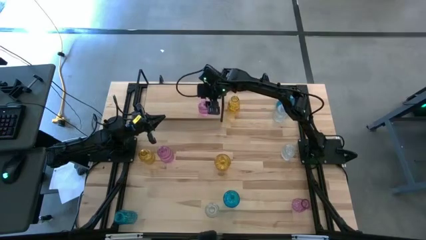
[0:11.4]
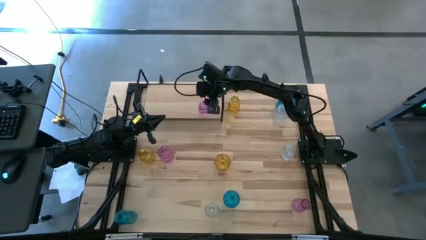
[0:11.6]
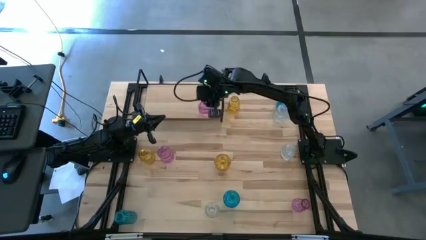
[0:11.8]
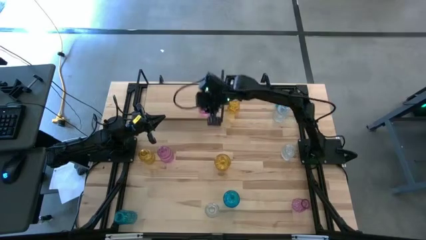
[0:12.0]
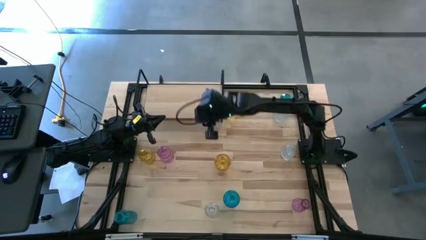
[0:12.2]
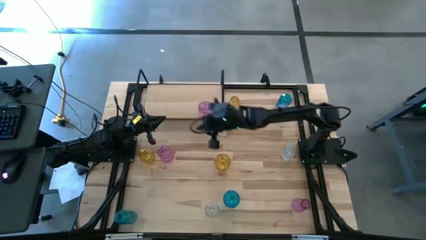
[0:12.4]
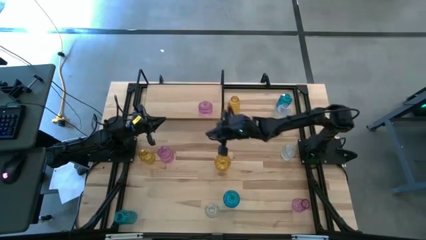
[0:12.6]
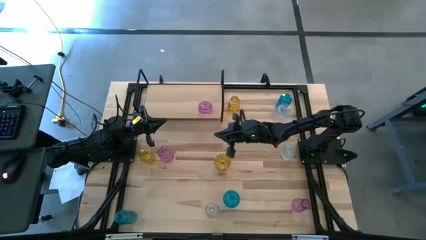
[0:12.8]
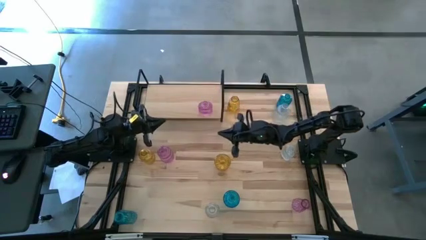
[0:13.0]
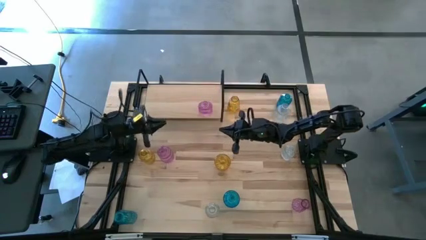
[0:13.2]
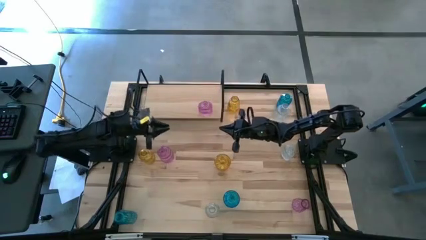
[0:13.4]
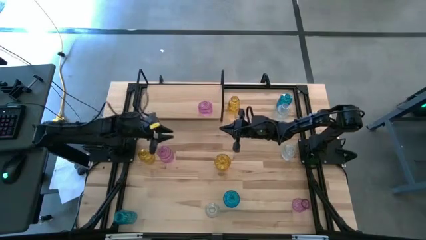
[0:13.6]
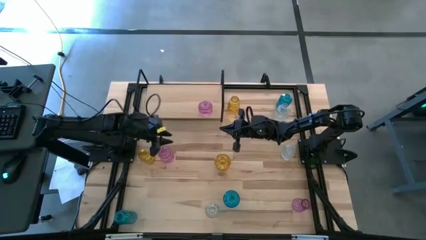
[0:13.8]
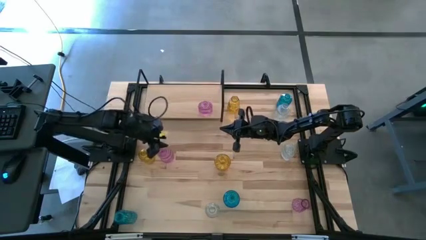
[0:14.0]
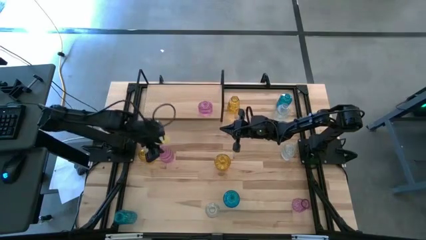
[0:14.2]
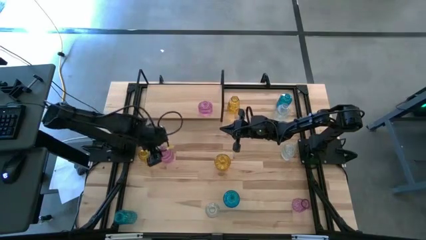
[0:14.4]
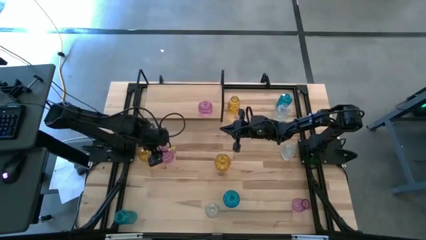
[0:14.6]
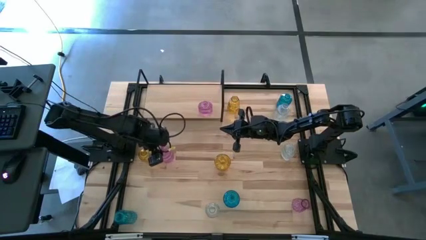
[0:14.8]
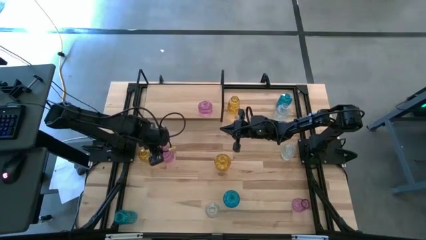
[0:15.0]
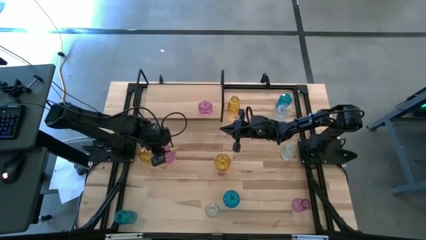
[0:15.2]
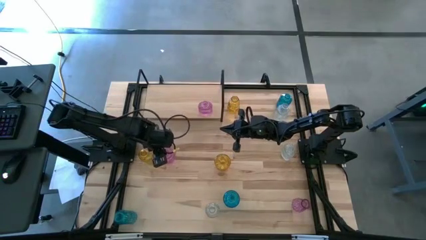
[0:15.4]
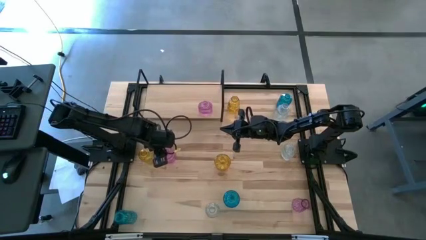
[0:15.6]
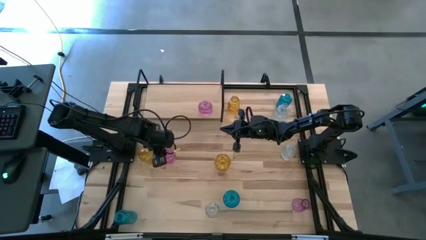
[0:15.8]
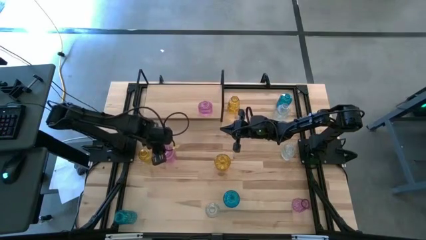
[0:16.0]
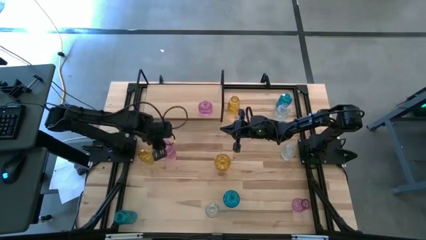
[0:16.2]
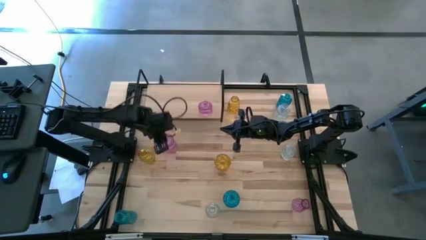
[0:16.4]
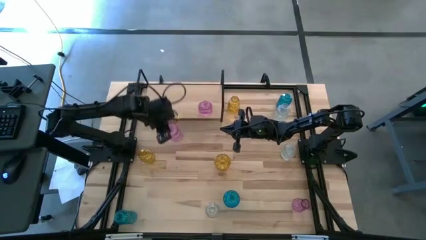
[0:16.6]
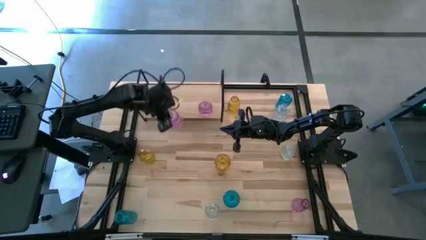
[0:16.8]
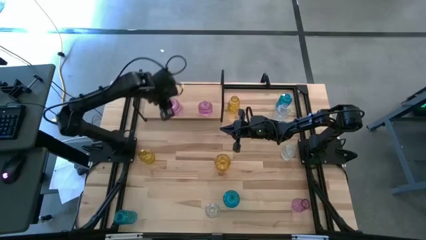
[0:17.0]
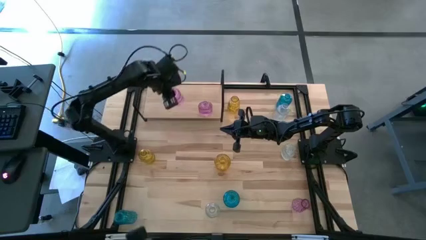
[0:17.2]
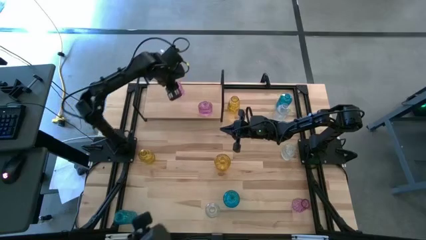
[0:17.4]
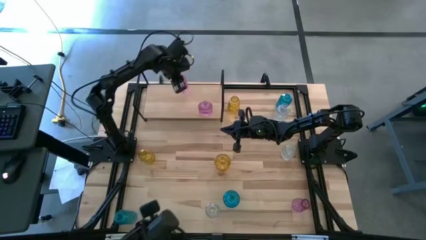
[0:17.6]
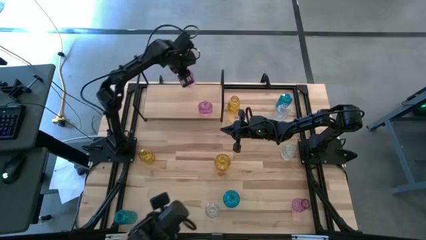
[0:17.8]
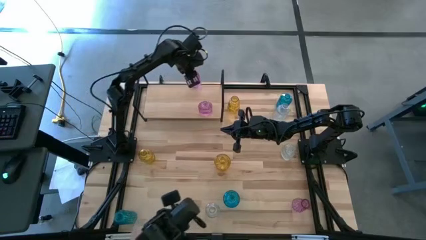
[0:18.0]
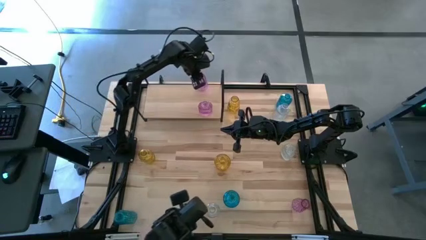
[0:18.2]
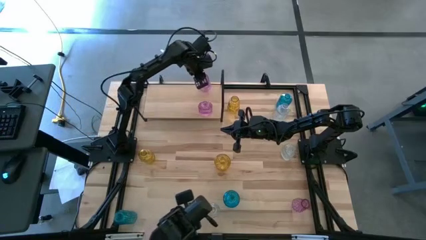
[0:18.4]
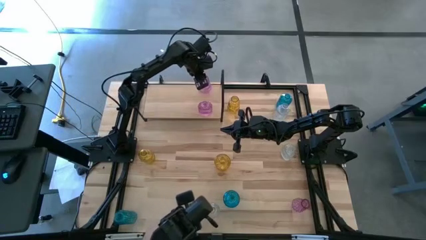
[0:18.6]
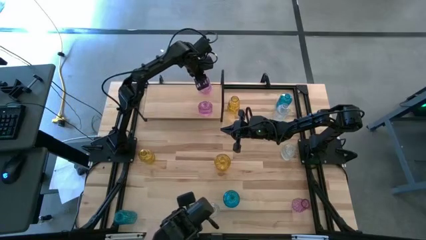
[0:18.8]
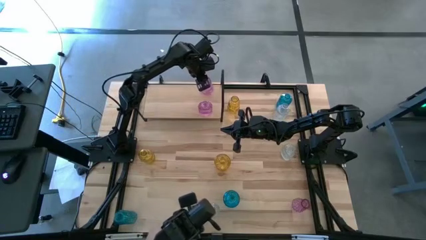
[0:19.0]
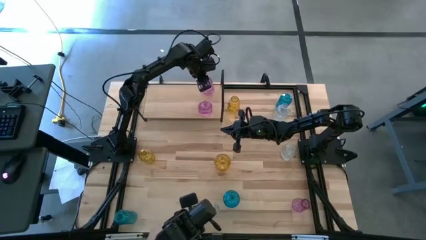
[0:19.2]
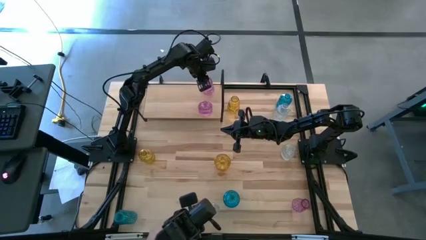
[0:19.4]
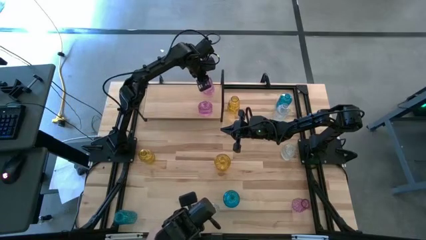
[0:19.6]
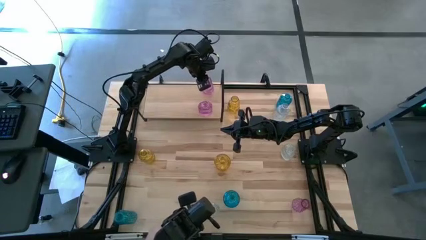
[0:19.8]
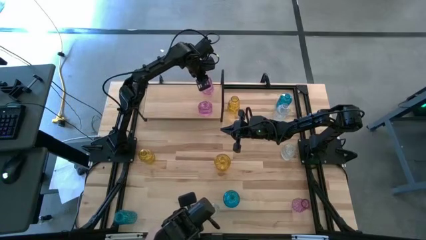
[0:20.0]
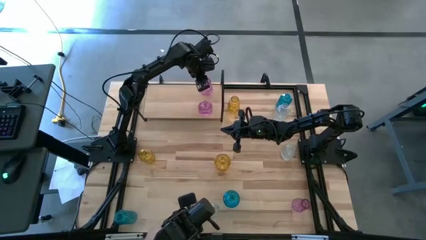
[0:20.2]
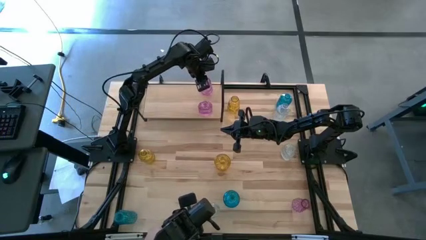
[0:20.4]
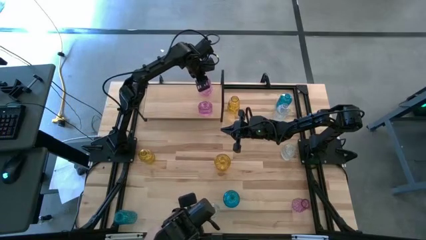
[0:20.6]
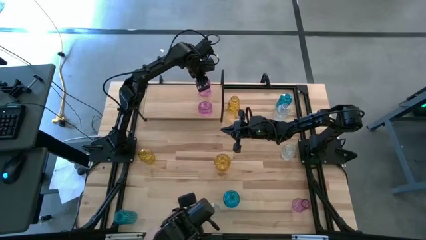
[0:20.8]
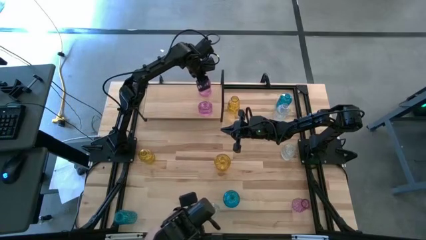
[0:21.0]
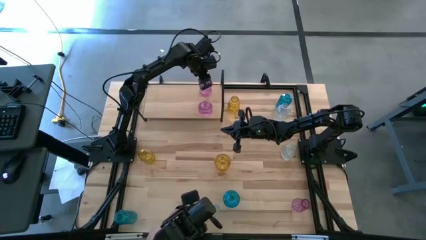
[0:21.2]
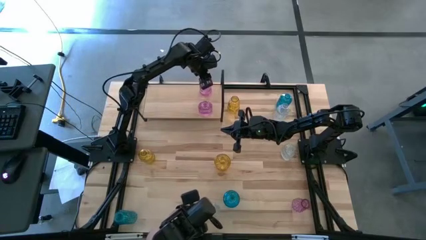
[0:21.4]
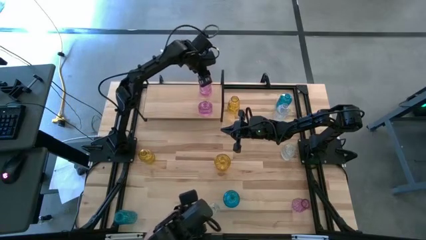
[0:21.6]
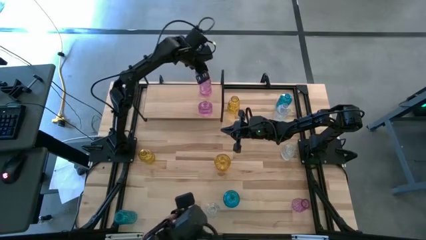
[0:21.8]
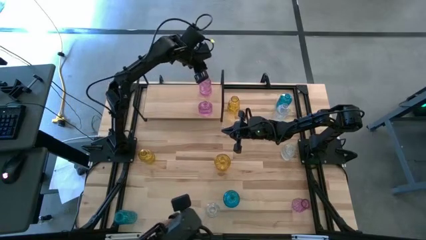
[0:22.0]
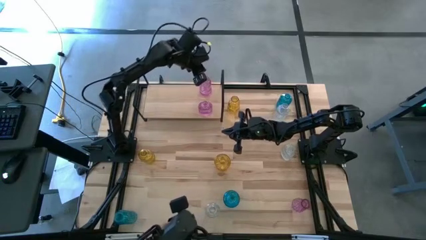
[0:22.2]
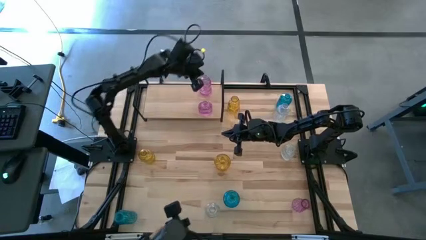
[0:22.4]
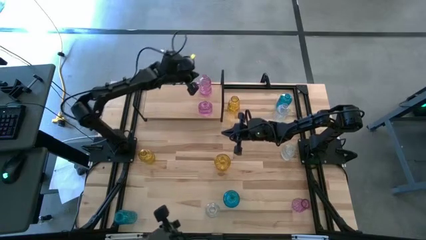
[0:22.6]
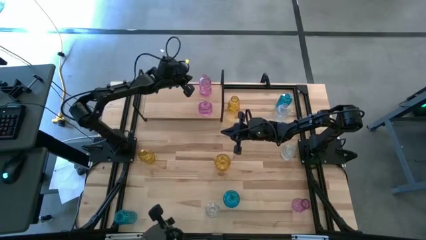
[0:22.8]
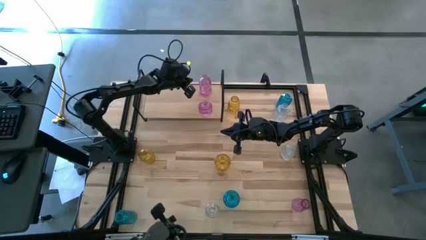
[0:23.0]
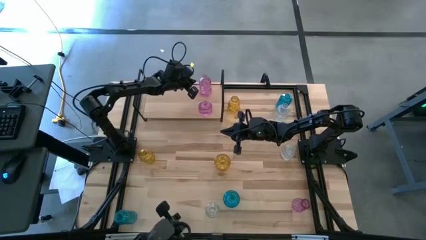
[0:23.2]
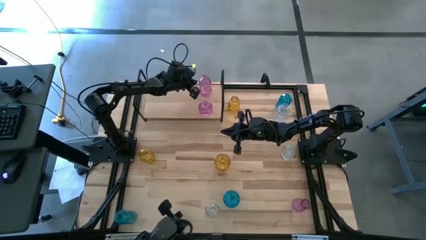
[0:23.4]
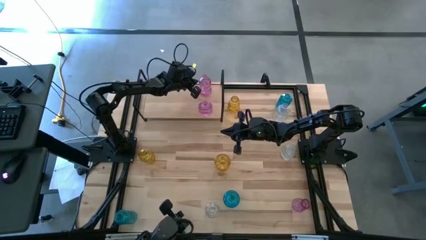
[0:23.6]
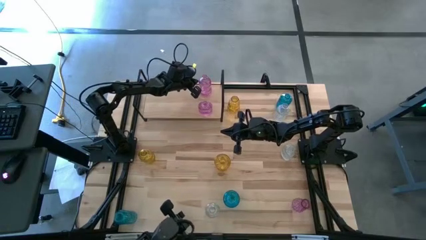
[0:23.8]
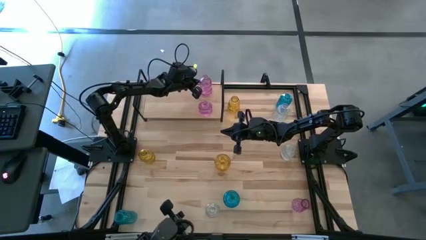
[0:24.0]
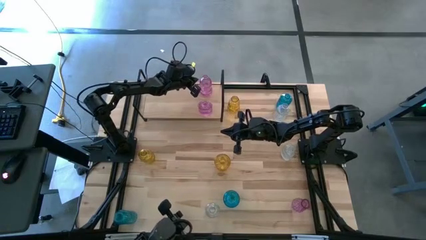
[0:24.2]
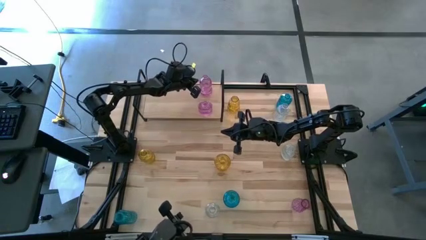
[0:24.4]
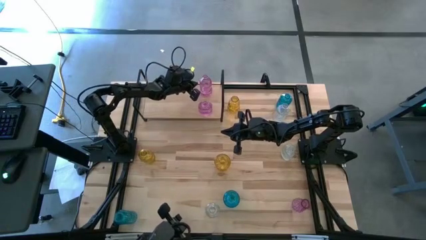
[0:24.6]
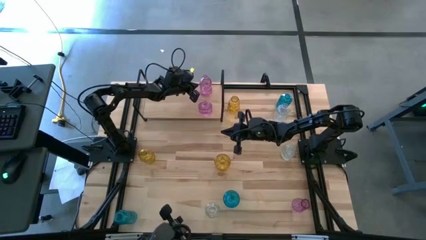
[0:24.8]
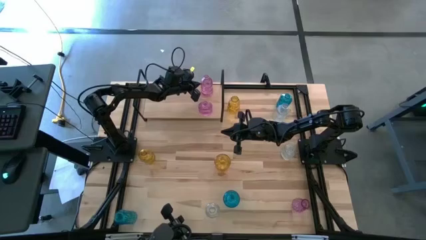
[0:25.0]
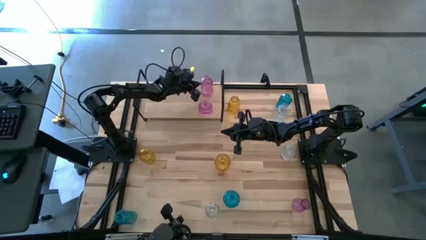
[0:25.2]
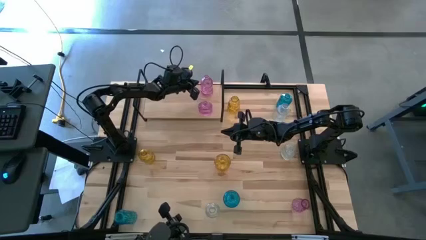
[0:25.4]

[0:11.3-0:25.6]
Task: sort vases onto shelf
Put the left pink vase on the shelf
